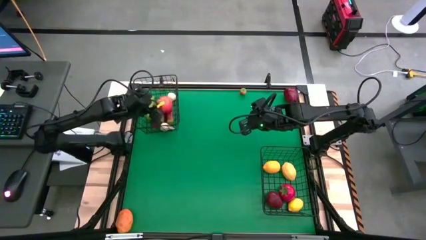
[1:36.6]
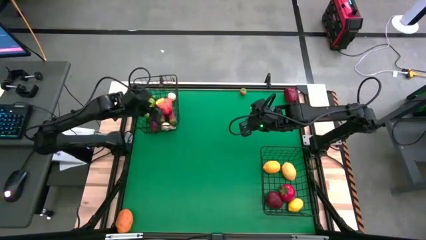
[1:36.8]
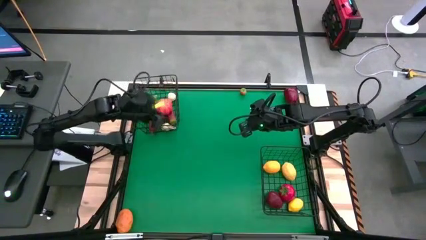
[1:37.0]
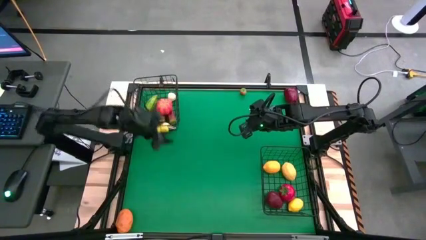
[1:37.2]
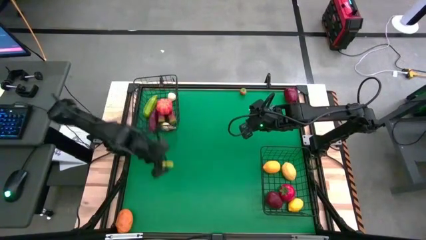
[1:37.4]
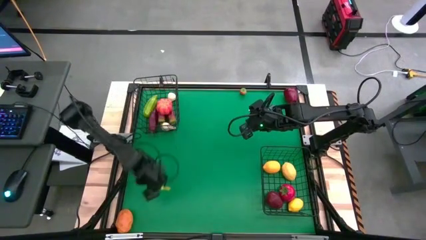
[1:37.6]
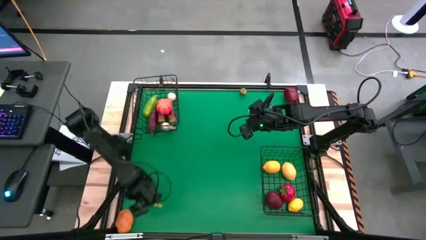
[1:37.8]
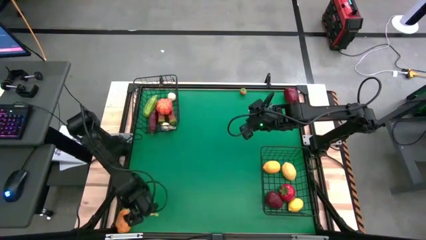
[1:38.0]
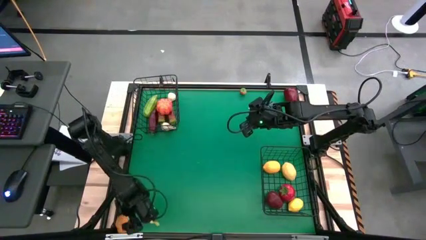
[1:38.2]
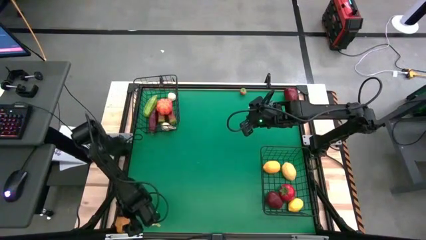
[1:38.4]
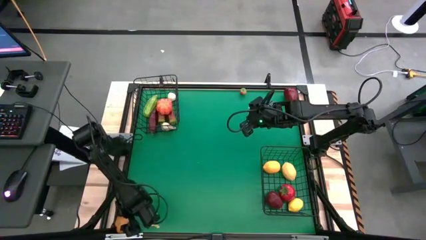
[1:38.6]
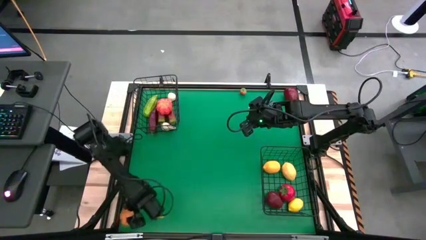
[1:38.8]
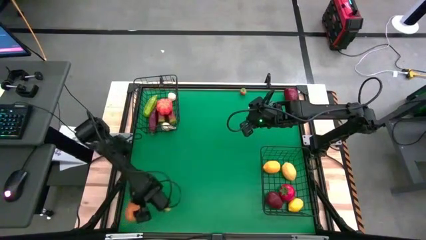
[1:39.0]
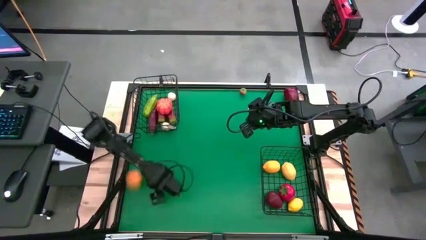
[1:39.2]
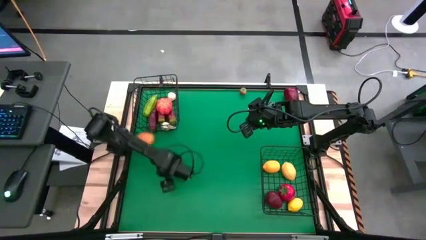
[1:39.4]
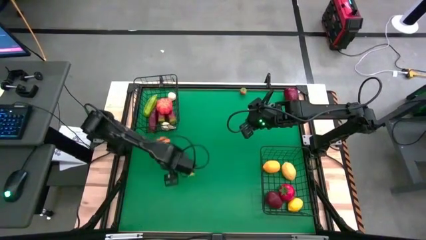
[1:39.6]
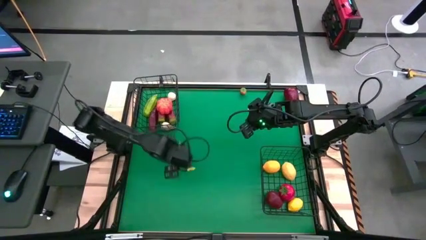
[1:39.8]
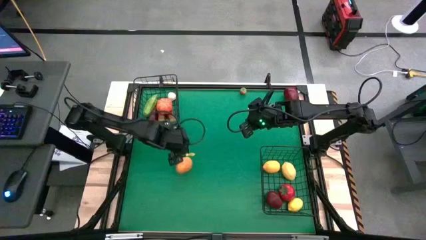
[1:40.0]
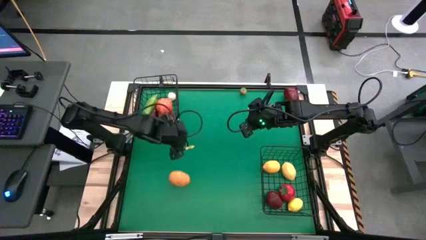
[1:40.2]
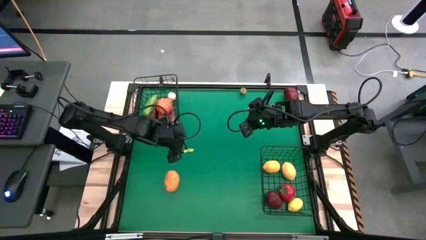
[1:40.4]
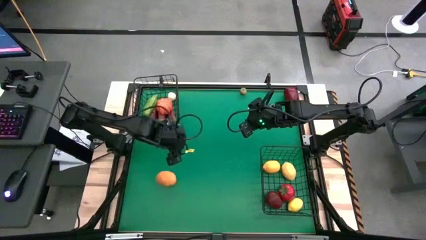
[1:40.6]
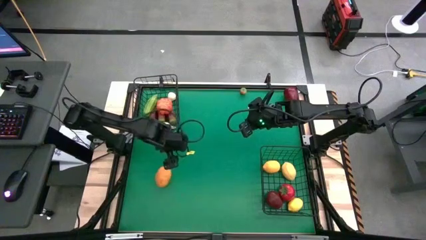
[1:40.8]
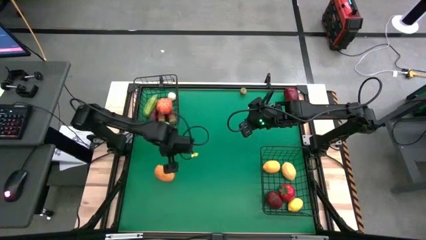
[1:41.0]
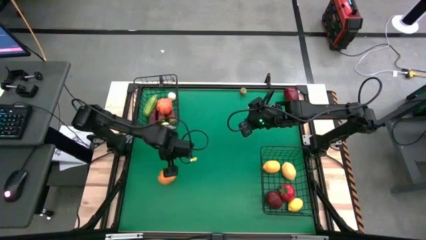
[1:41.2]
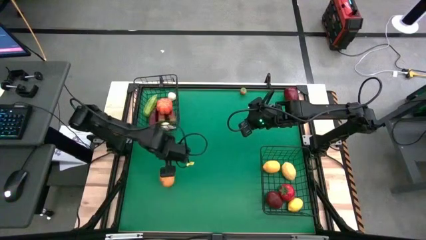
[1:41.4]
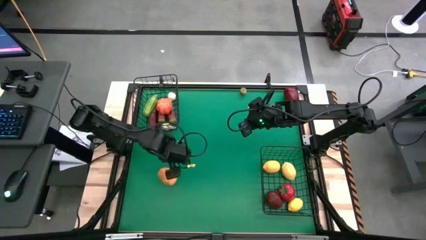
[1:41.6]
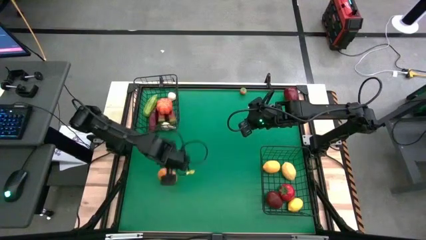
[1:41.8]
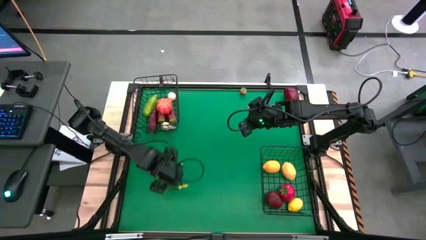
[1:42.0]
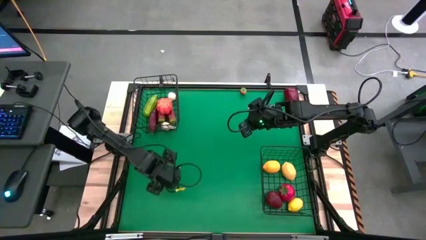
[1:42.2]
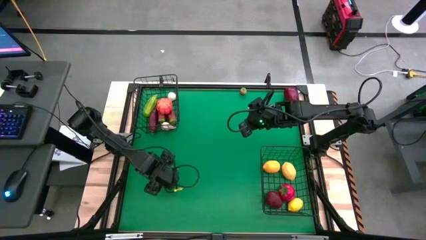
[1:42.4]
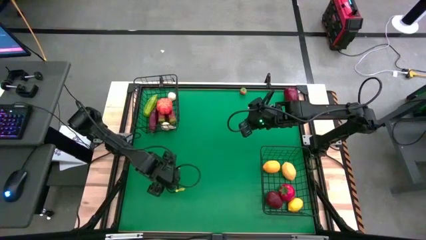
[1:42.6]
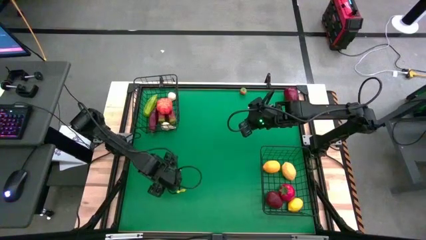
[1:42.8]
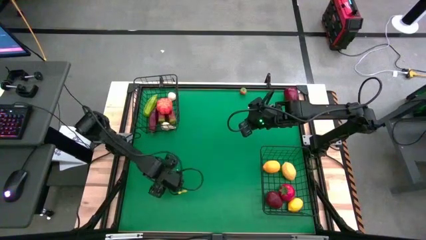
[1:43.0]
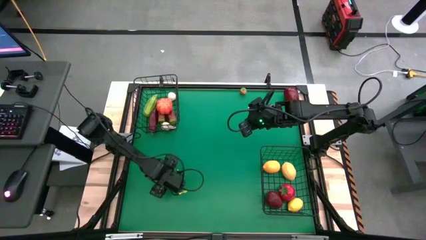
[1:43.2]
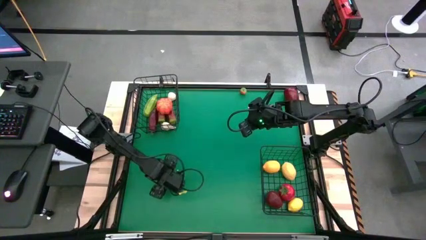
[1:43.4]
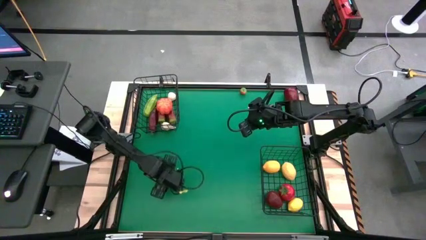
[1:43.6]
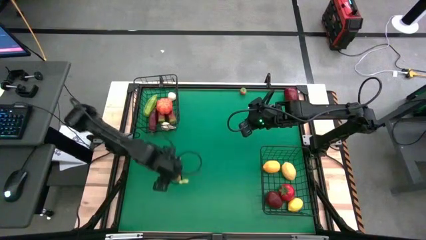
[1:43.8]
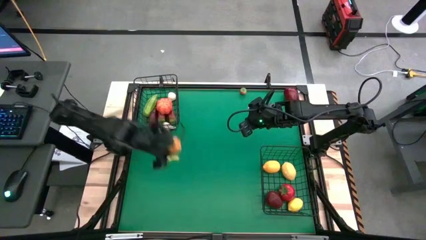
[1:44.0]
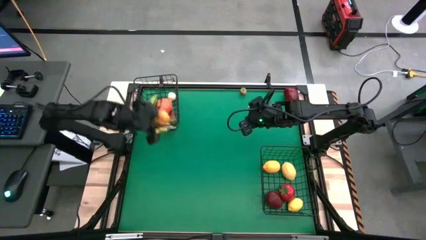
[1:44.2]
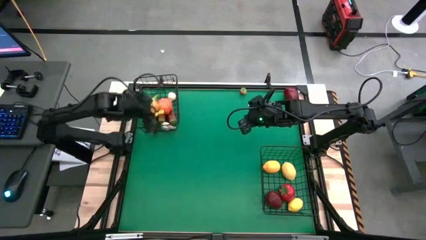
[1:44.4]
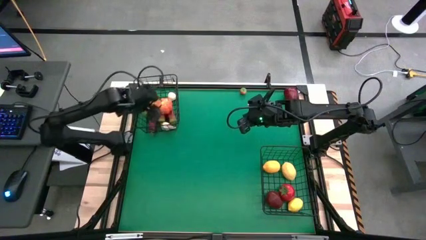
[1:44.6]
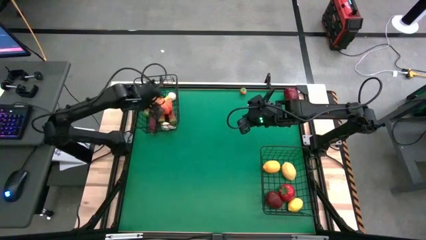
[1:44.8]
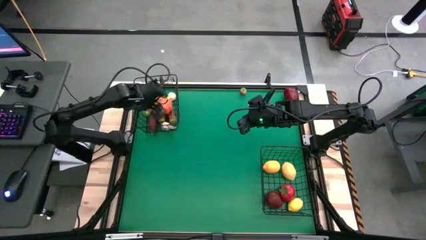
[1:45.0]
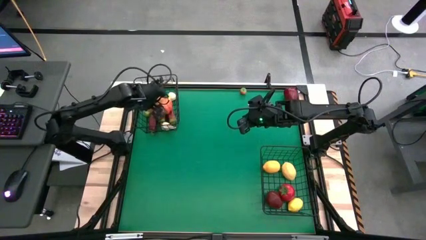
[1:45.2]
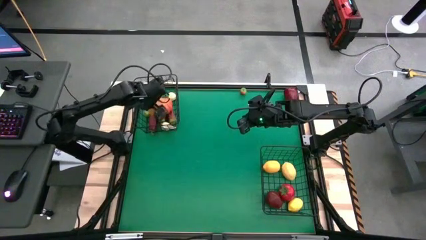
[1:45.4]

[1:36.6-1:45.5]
Task: Sort produce into baskets
Put the brown potato into the top black wire basket

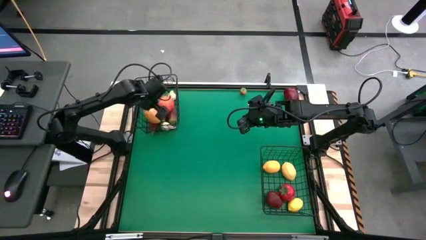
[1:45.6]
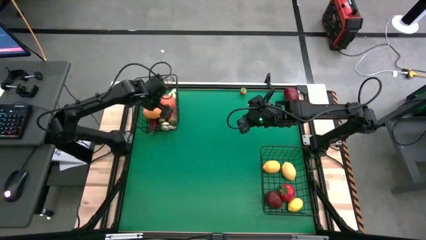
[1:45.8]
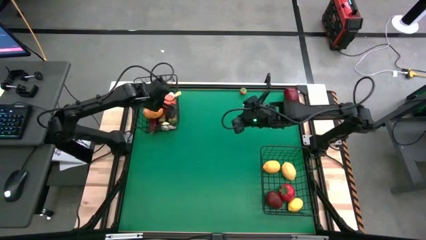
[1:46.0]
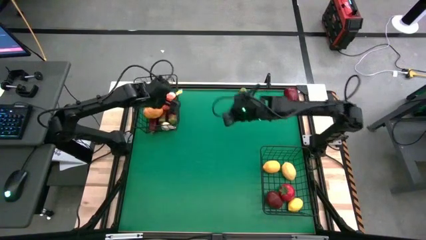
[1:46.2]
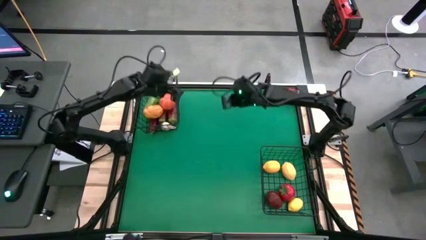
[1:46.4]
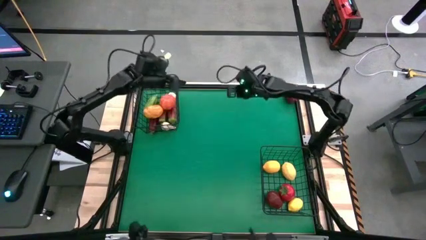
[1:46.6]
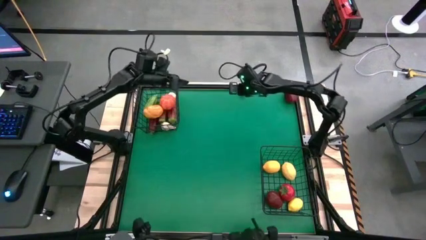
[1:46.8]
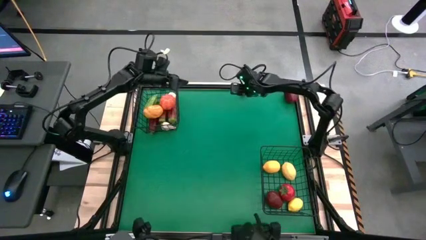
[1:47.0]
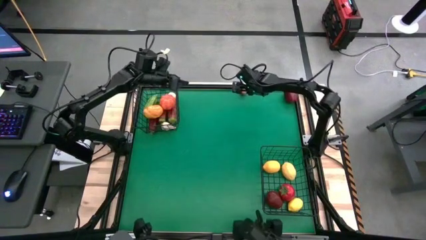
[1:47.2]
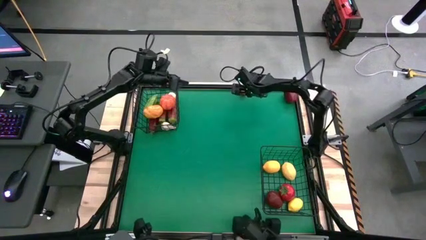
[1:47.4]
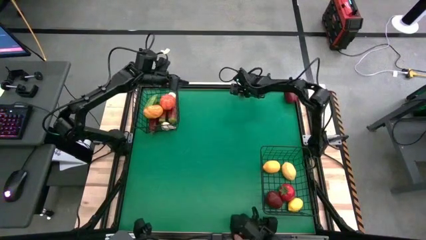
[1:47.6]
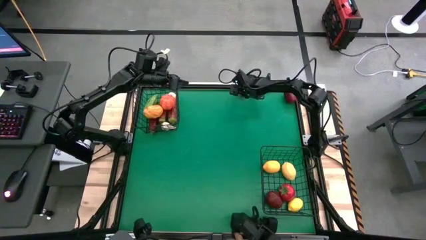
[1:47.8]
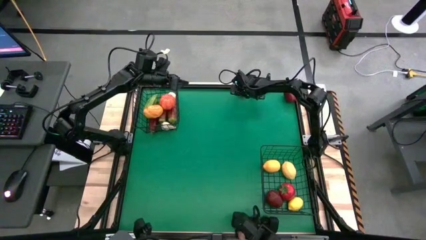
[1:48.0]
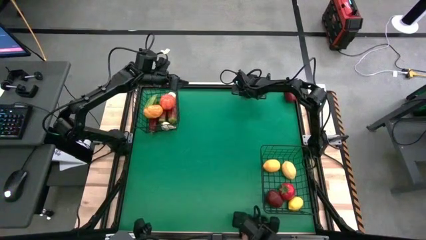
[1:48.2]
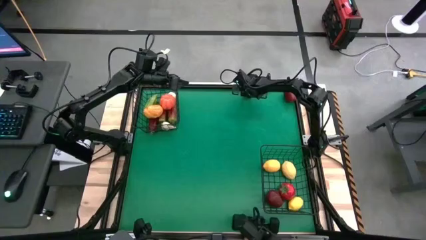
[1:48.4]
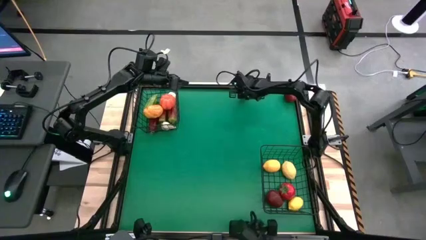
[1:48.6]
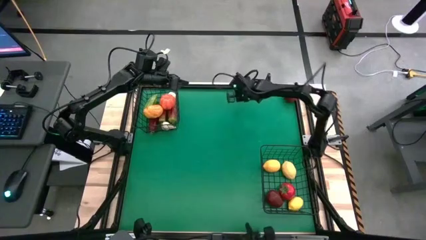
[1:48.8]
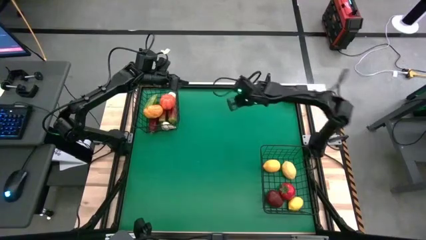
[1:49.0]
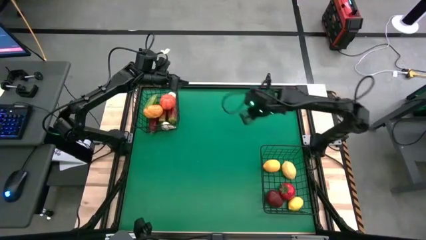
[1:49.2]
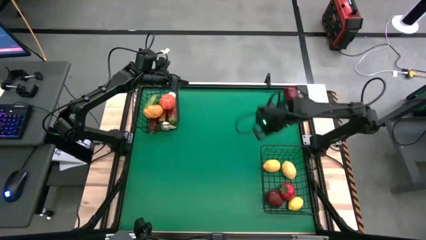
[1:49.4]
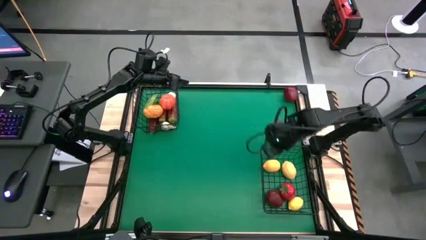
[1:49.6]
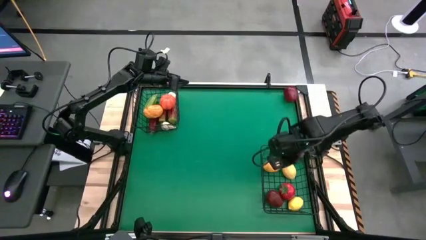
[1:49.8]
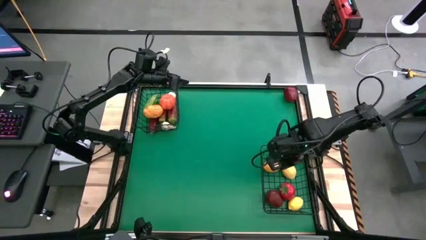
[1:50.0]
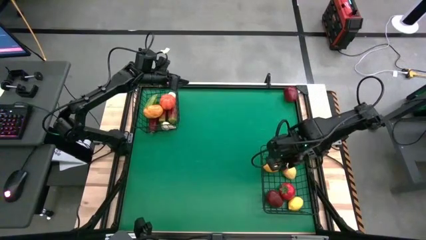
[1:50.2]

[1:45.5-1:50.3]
Put the orange tomato into the bottom black wire basket

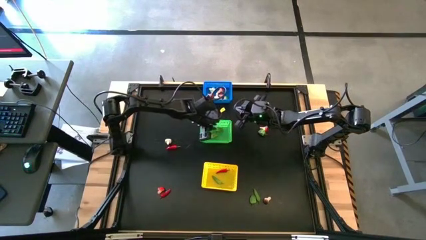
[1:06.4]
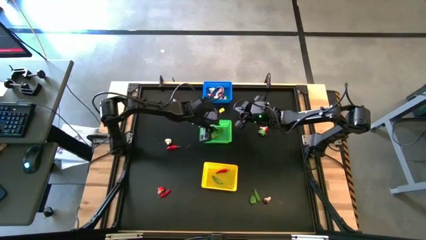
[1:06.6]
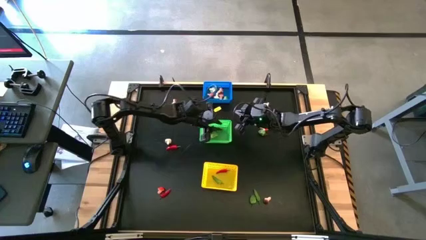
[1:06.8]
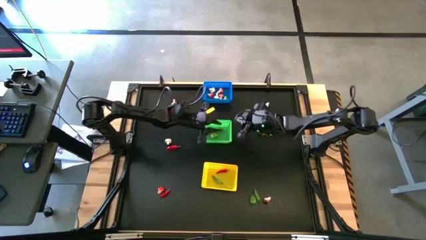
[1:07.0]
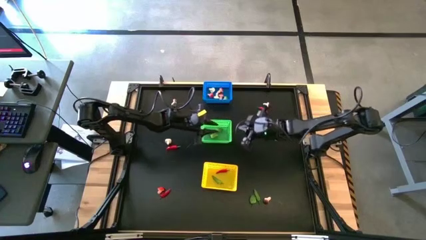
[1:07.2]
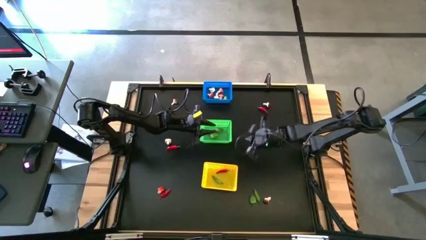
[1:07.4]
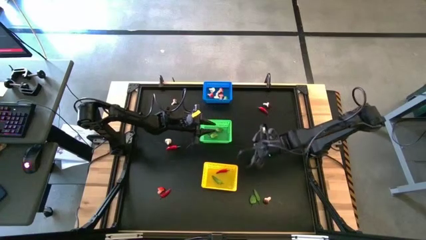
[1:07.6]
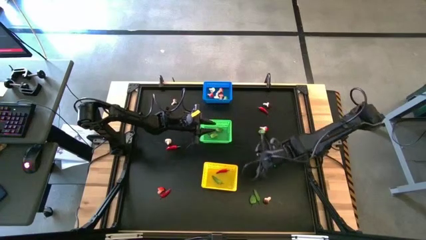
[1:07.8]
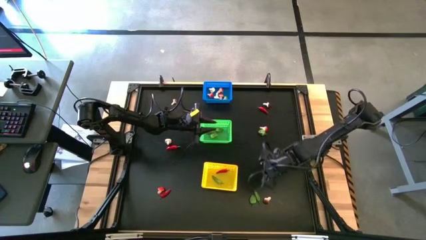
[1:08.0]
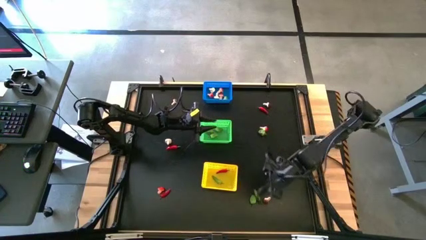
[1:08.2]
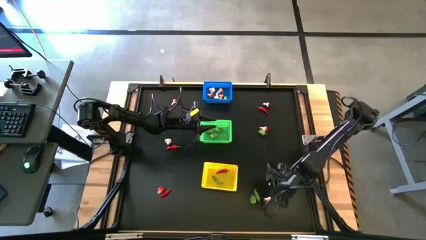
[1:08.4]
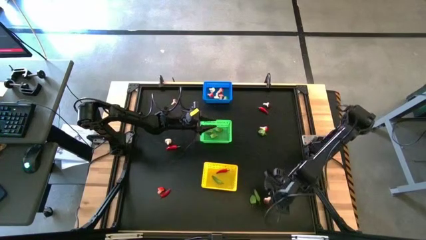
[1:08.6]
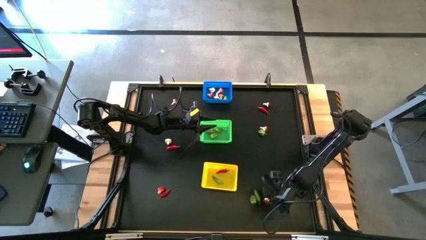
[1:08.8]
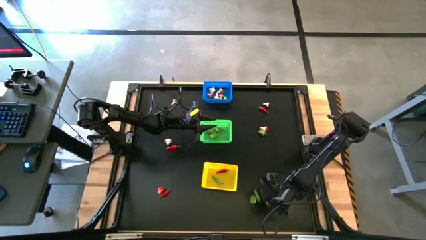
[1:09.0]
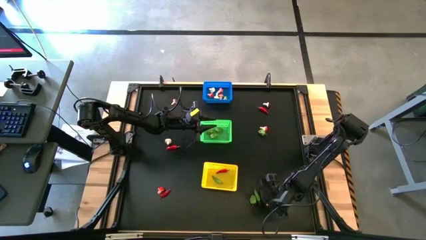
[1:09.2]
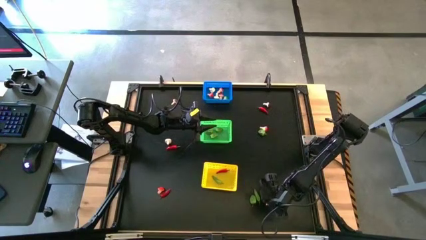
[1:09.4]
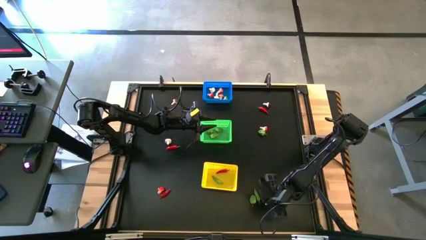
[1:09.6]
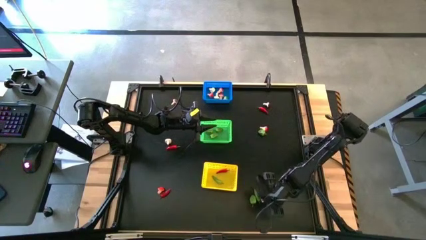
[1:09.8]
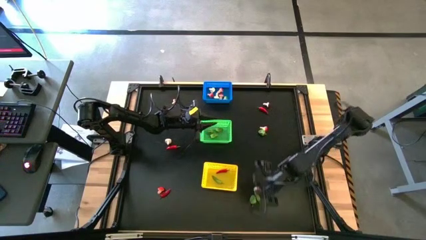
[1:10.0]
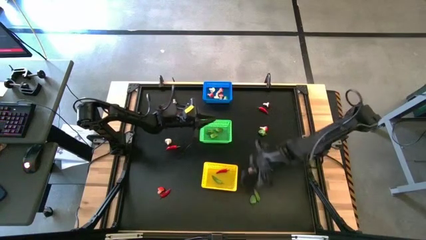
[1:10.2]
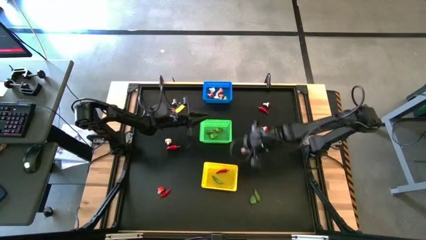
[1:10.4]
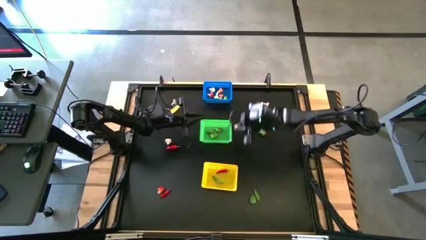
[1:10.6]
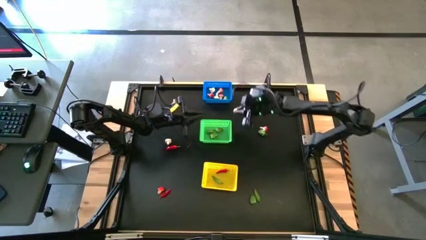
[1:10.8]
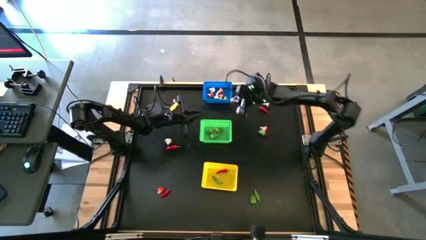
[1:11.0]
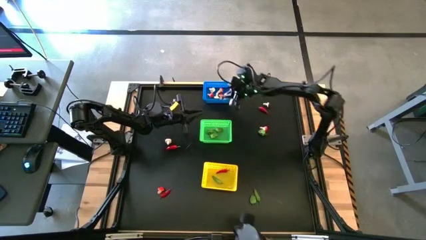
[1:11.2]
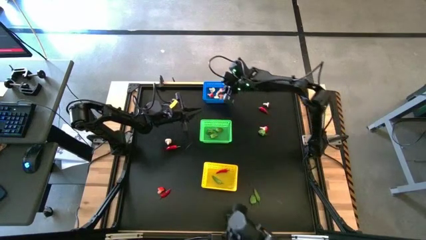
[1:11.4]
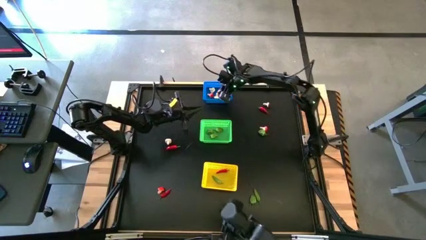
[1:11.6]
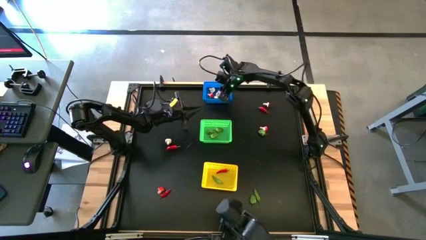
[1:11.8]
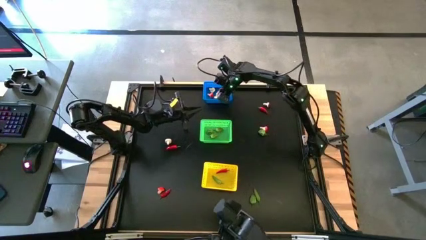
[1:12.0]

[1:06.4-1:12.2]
Task: Sort produce into baskets
Put the brown mushroom into the blue bin
